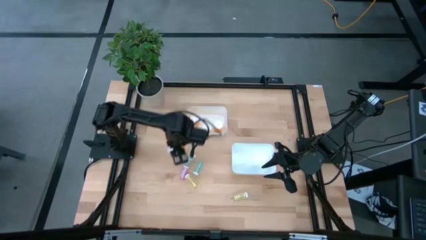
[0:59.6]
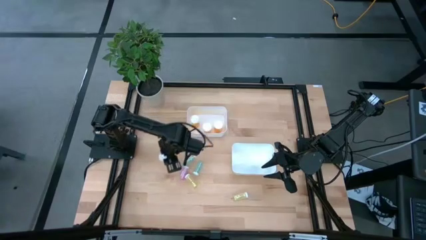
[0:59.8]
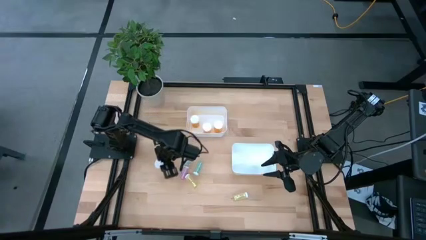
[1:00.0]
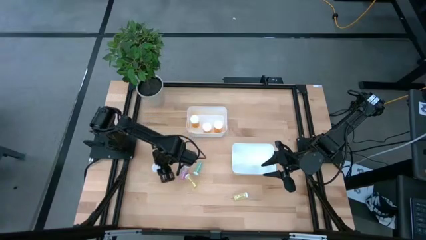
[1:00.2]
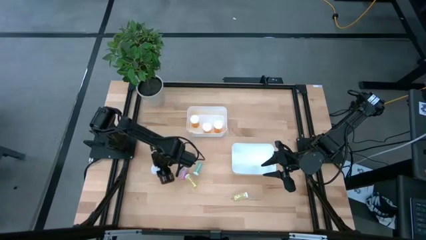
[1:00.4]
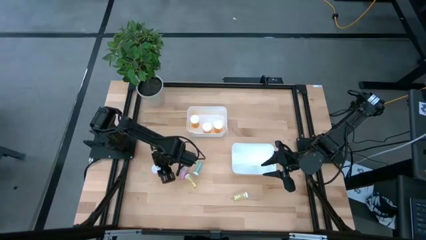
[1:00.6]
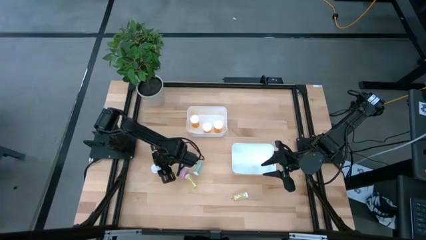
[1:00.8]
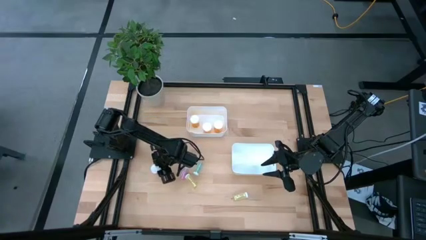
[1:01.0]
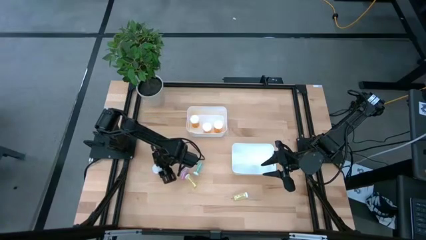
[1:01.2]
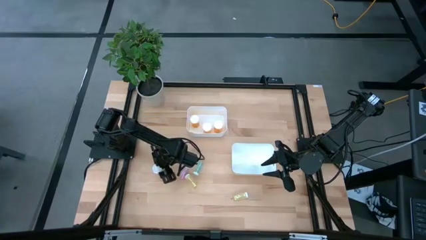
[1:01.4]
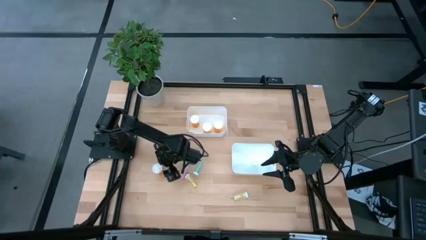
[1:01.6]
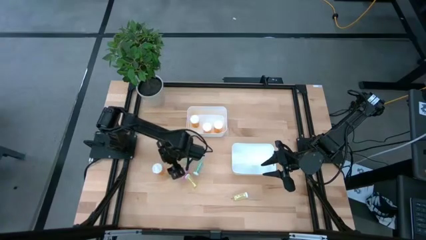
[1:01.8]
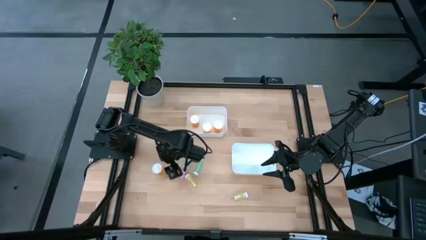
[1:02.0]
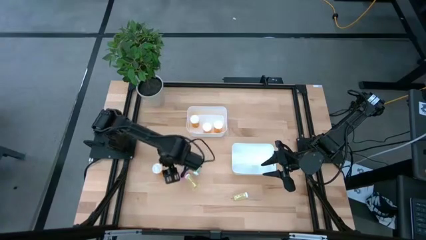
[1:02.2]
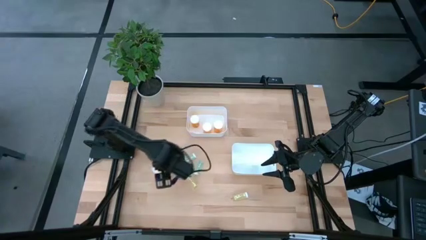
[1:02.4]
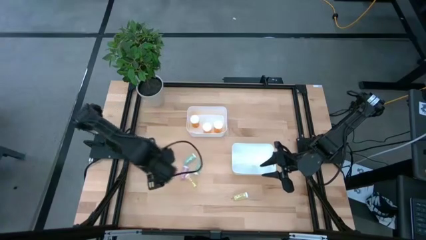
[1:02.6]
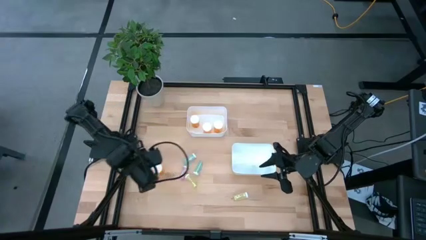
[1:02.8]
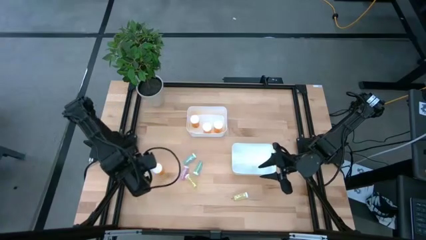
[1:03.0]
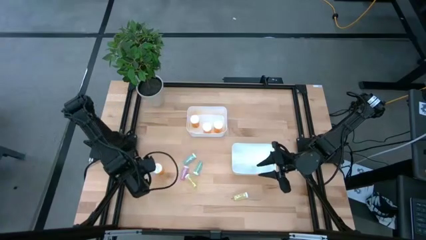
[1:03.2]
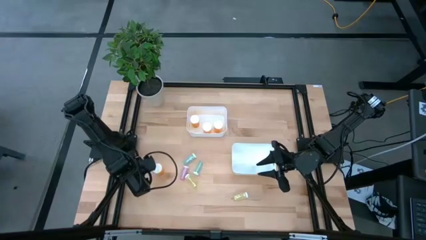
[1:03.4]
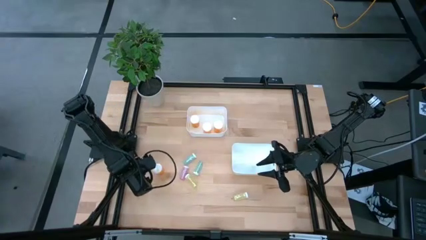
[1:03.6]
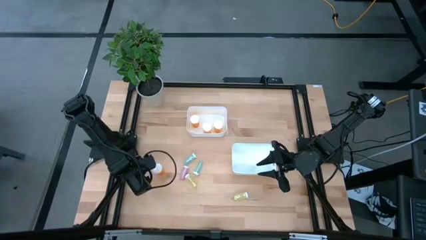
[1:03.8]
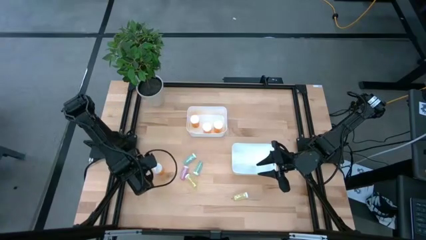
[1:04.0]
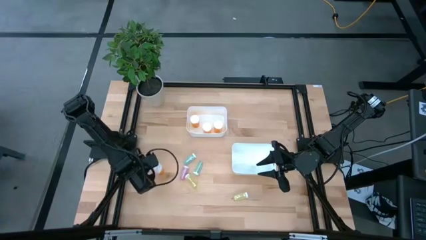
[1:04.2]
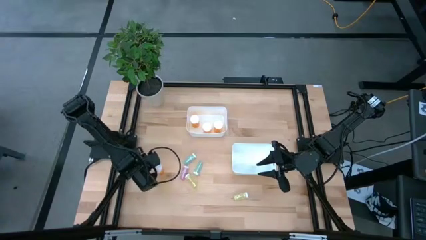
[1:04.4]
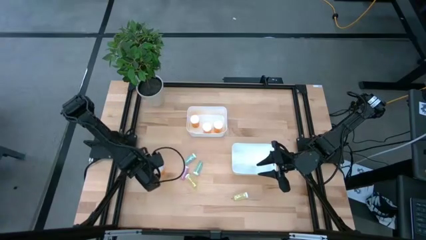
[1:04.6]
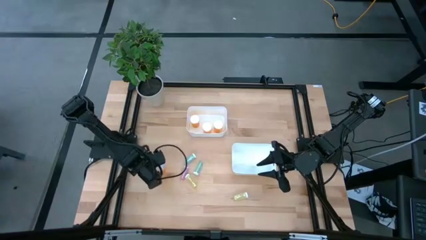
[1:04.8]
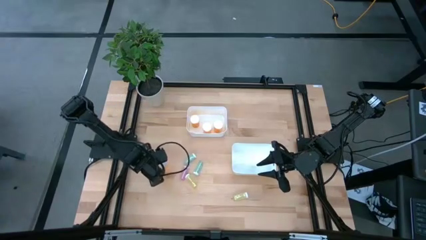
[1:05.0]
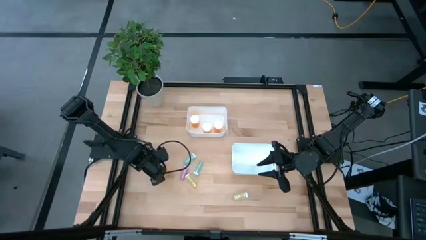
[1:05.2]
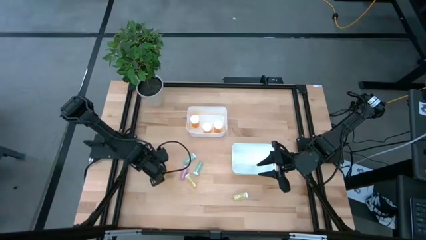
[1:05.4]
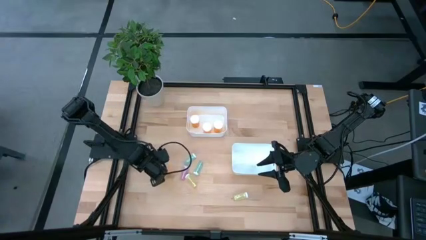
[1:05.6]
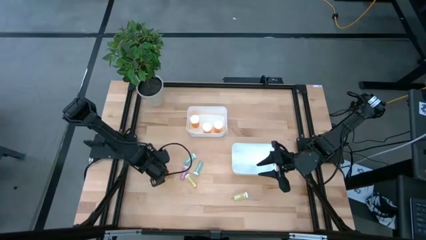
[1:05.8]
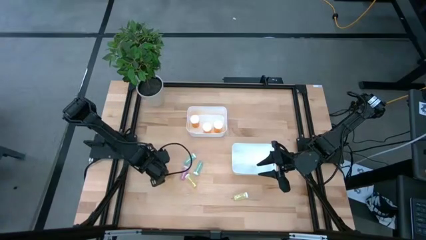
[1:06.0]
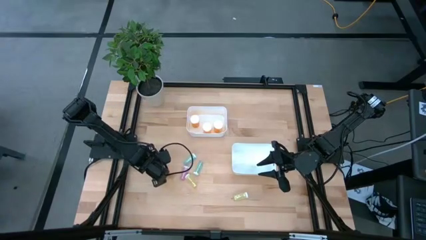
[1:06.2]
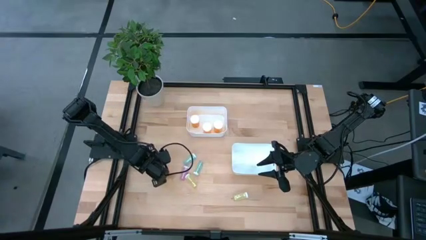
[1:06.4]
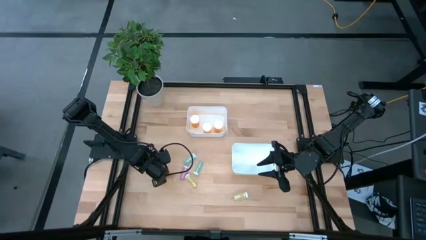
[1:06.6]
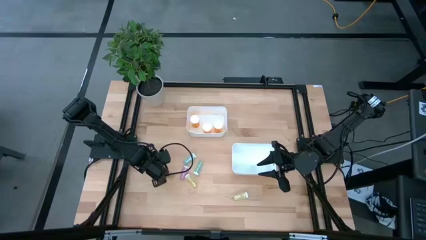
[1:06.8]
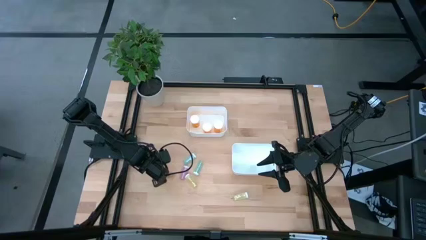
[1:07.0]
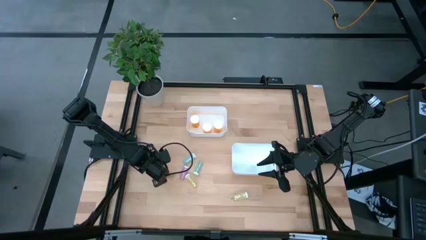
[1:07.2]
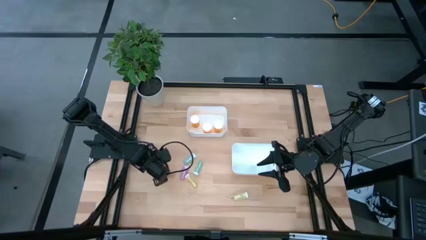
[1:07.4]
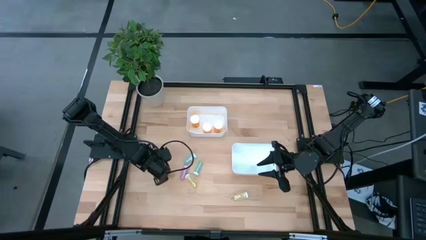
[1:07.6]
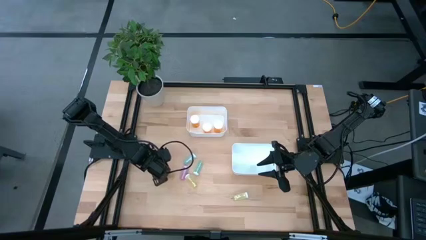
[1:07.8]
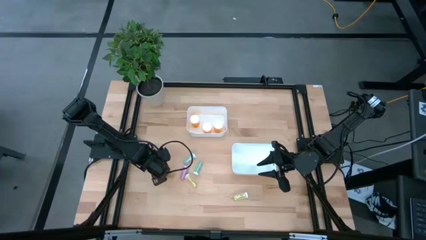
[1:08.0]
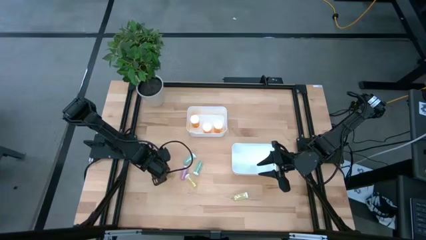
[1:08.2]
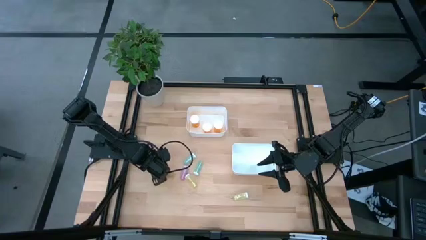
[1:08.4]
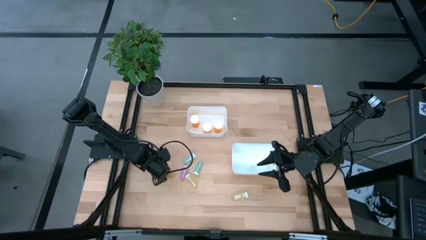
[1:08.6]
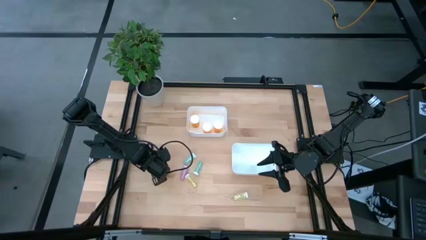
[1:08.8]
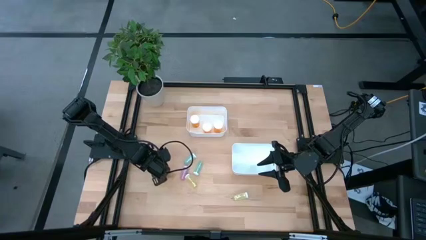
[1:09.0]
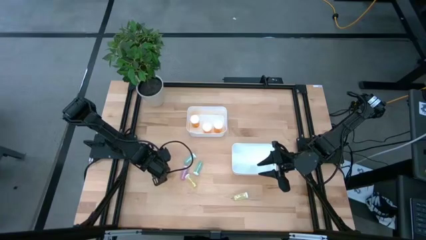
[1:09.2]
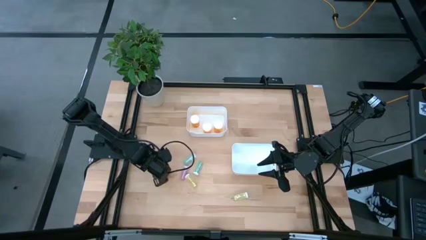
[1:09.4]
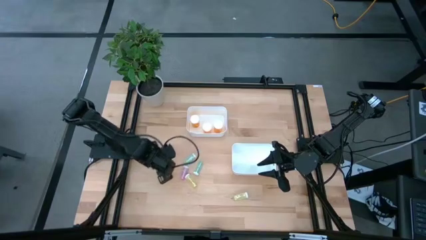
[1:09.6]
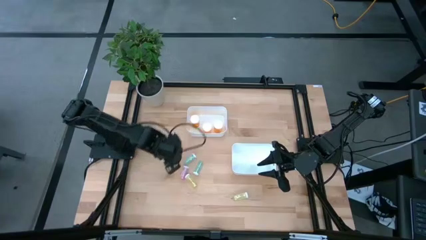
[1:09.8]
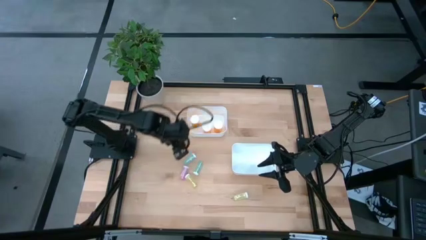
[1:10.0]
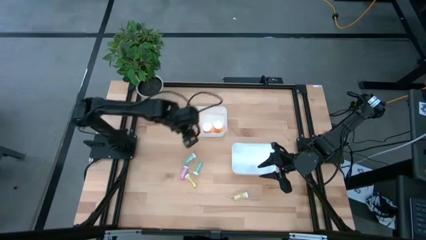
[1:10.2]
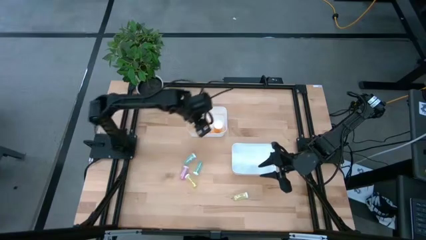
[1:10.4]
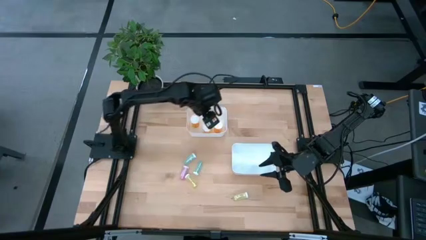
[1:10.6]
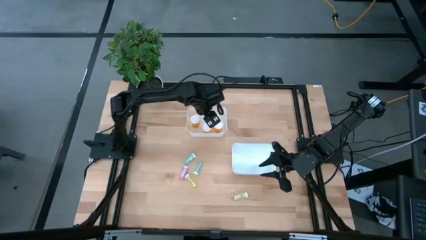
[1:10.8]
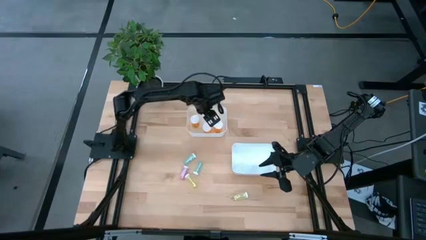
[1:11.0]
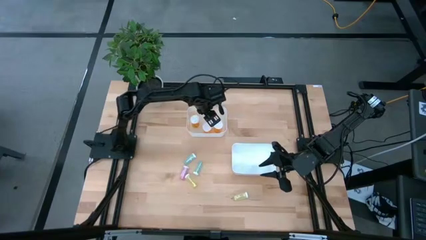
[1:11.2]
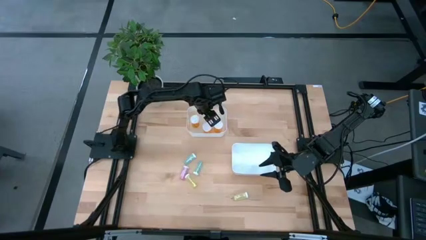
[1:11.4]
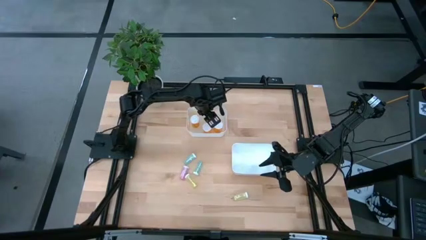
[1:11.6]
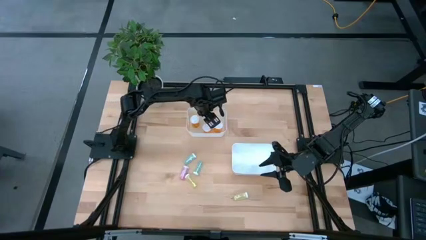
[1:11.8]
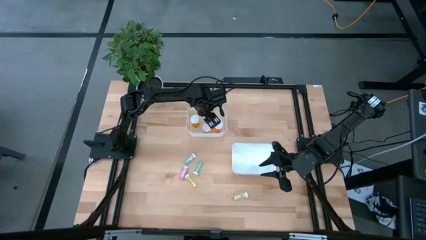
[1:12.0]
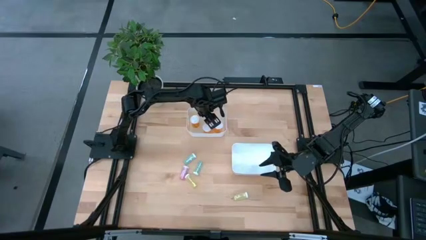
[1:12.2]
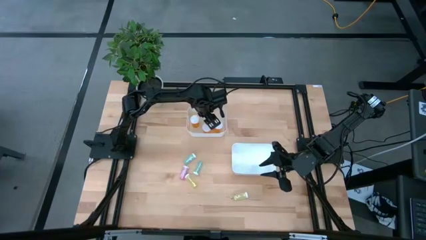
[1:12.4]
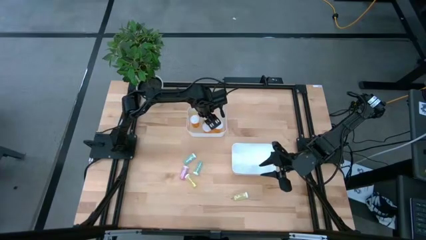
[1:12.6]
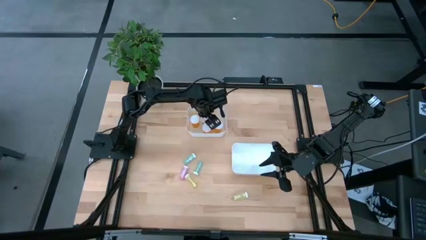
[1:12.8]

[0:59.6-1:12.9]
Task: Pick and place medicine bottles into bin by pill shape (circle, oval)
Put the large orange pill bottle into the top white bin

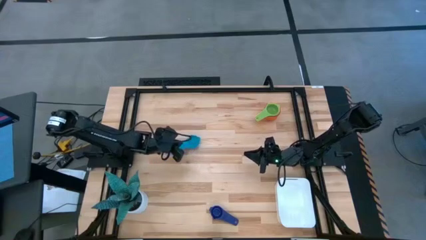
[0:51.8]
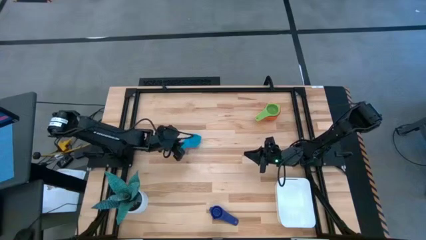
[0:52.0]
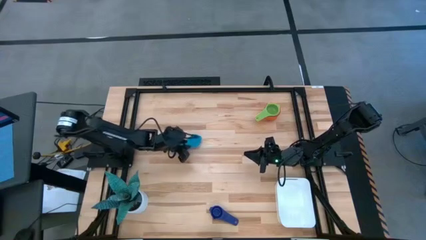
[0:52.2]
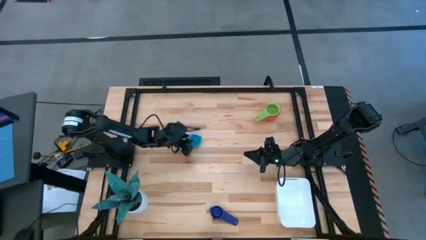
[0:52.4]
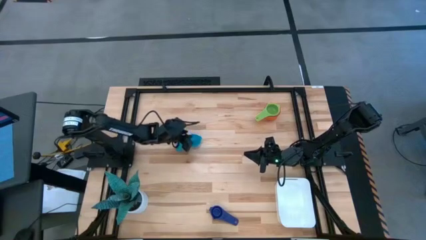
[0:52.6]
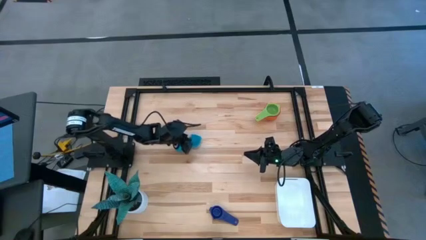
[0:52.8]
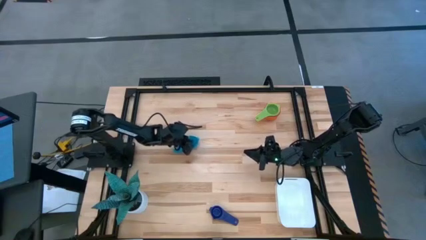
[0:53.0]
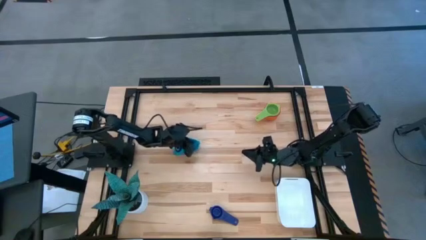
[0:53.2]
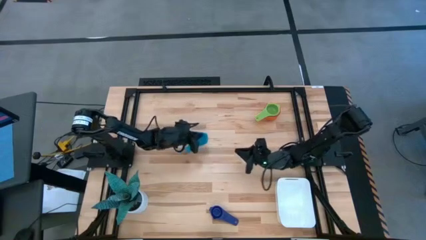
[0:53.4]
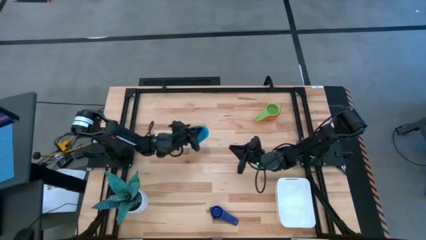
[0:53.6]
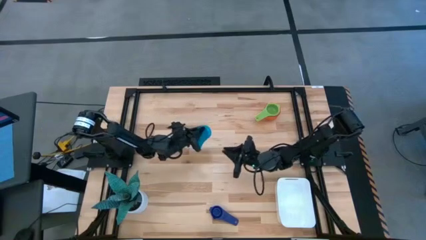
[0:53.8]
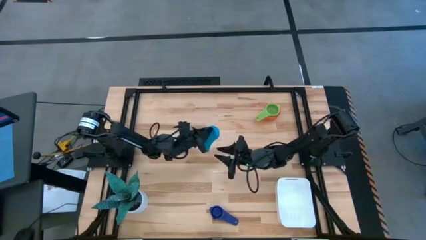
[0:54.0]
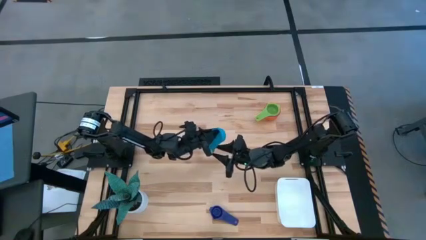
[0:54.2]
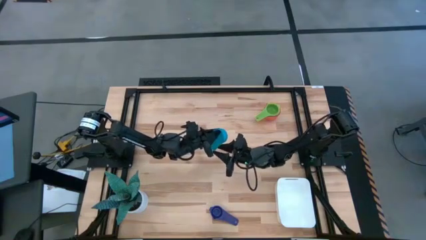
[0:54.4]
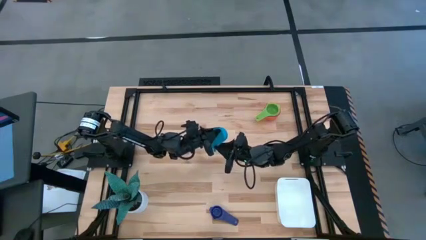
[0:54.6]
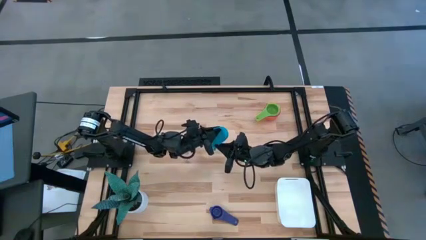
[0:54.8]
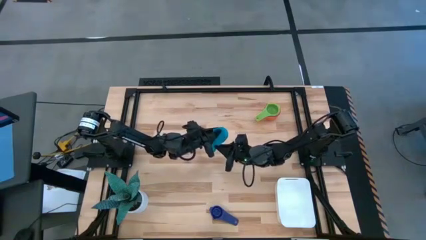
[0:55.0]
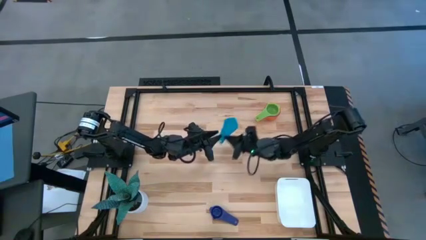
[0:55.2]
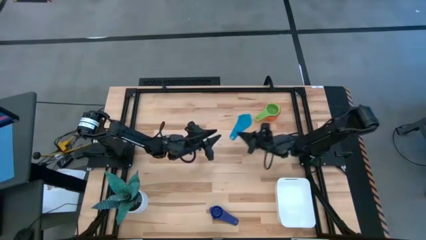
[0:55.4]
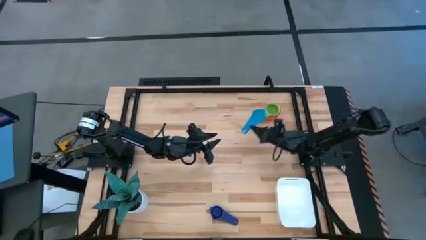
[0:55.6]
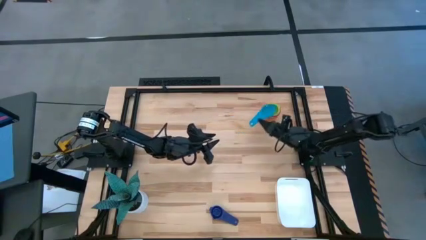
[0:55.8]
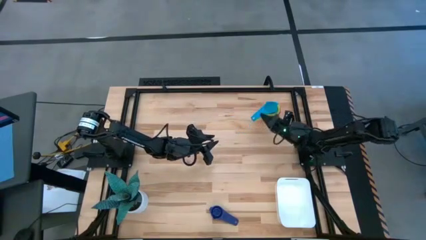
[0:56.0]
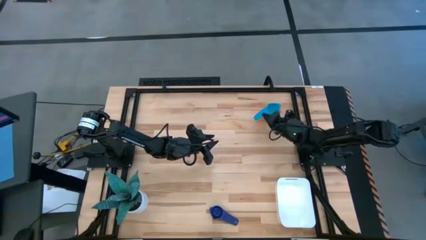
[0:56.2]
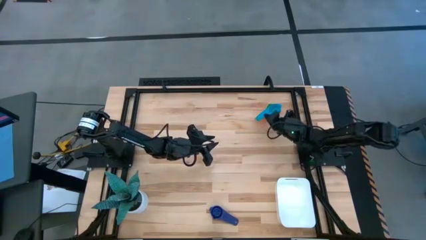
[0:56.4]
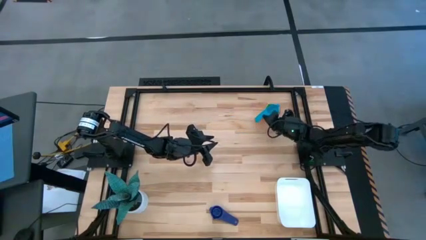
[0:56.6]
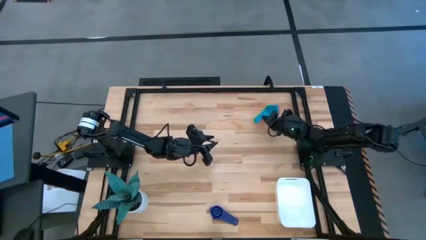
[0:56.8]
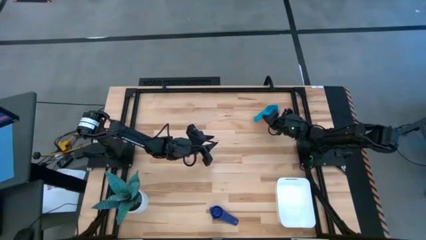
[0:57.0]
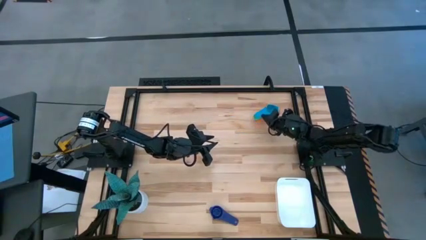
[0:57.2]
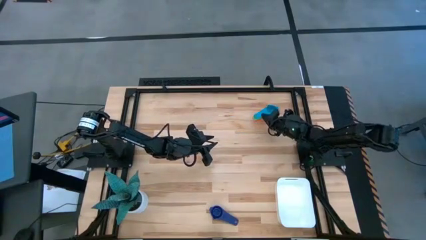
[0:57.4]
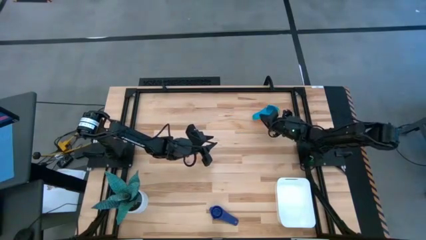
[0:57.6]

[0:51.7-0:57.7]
Task: Nest measuring cups in basket
Stack the light blue measuring cup on the green measuring cup
